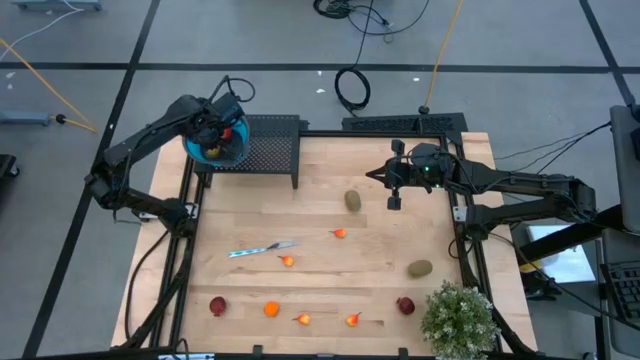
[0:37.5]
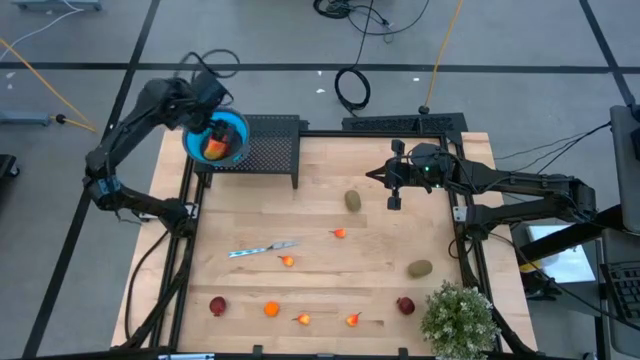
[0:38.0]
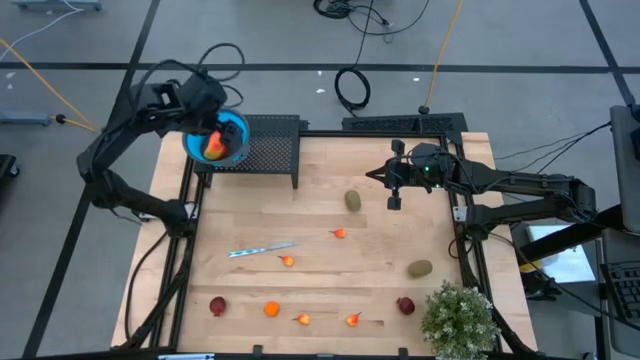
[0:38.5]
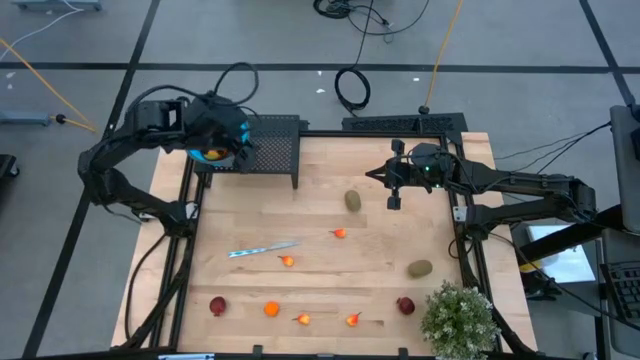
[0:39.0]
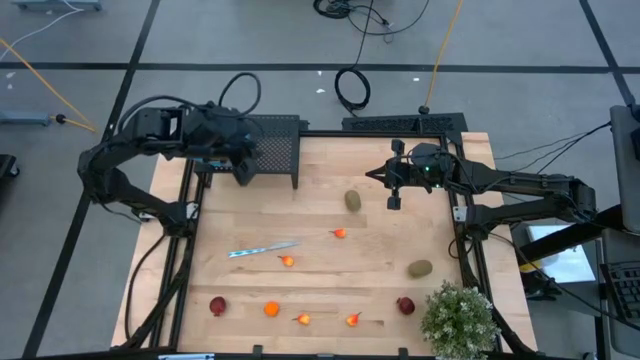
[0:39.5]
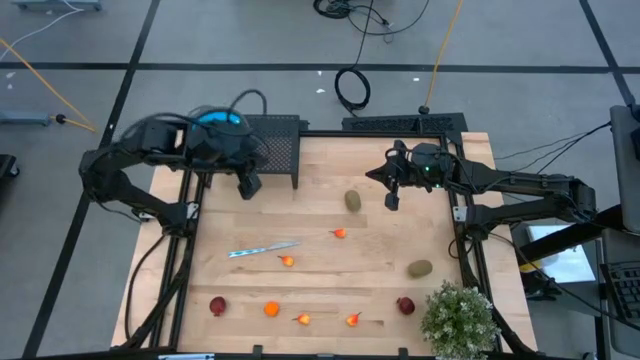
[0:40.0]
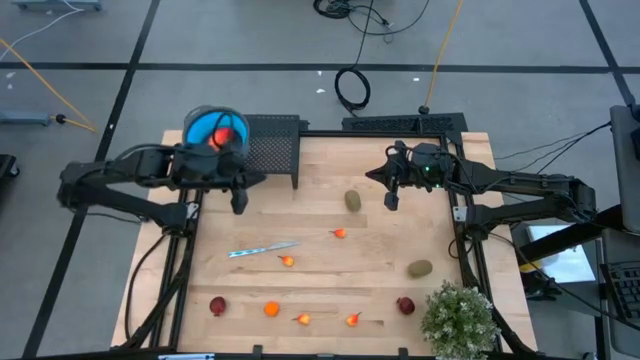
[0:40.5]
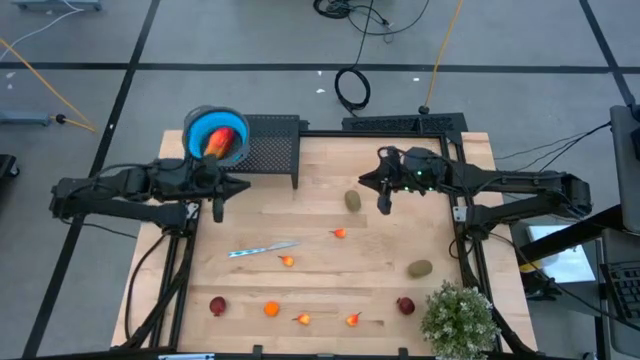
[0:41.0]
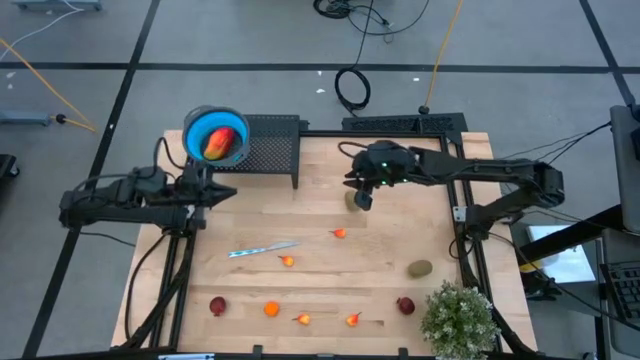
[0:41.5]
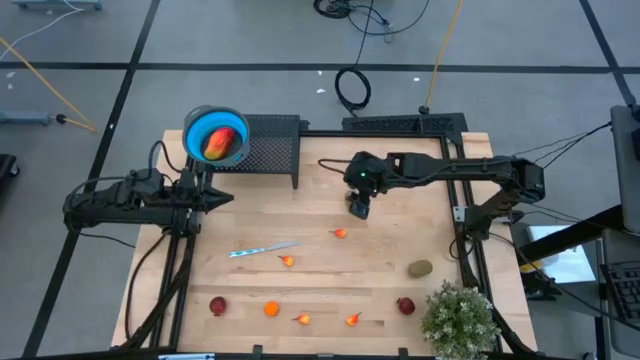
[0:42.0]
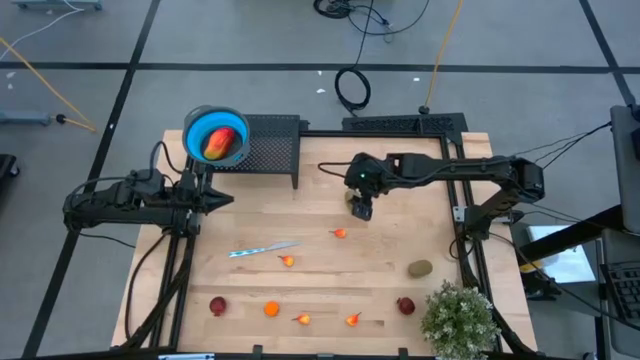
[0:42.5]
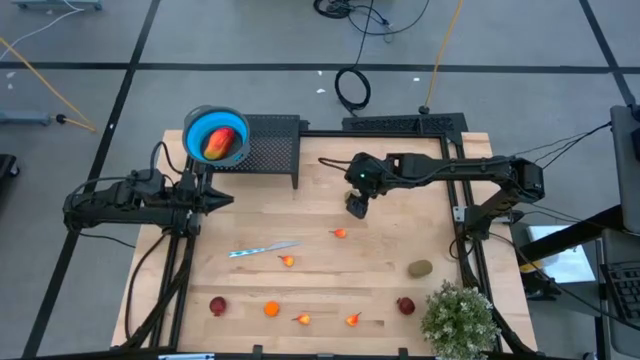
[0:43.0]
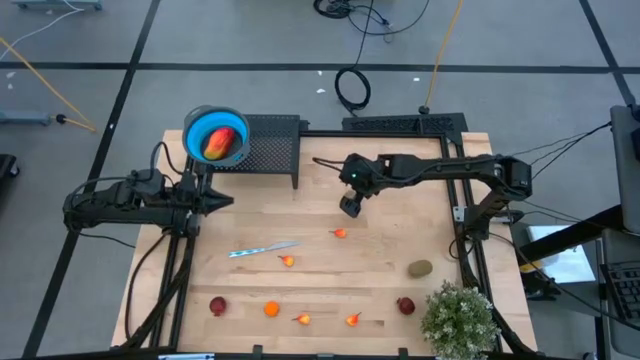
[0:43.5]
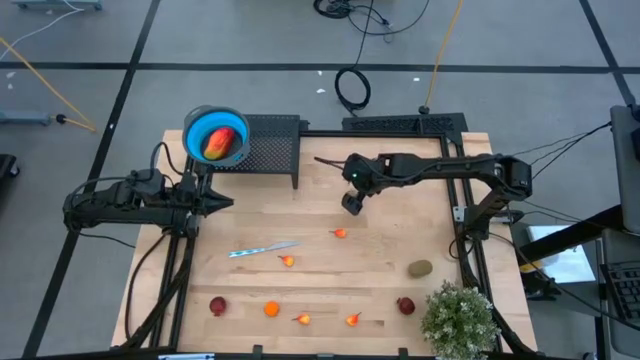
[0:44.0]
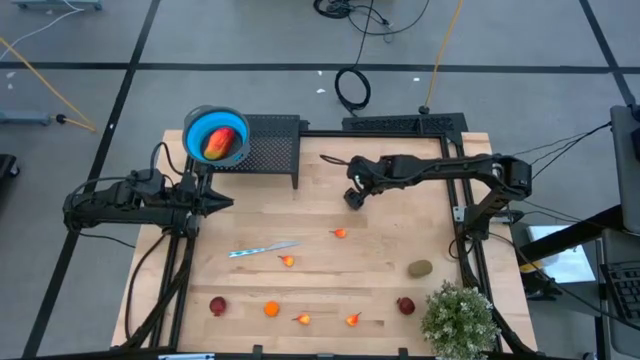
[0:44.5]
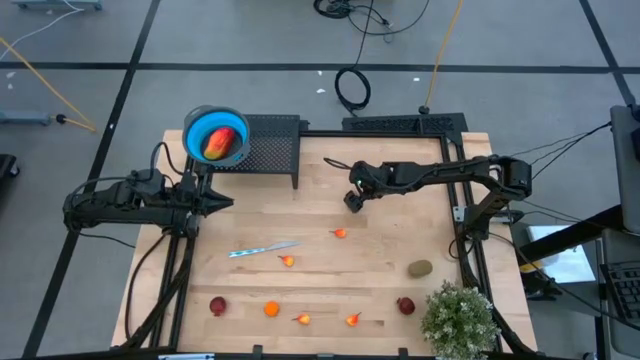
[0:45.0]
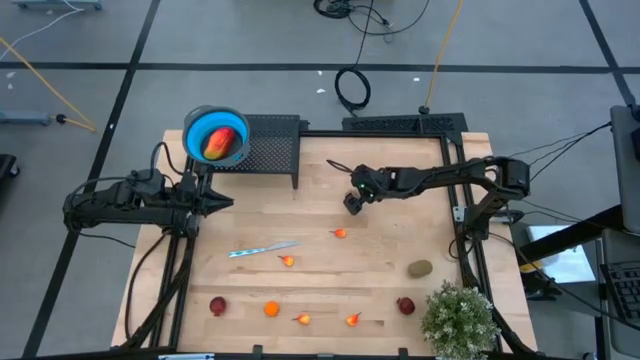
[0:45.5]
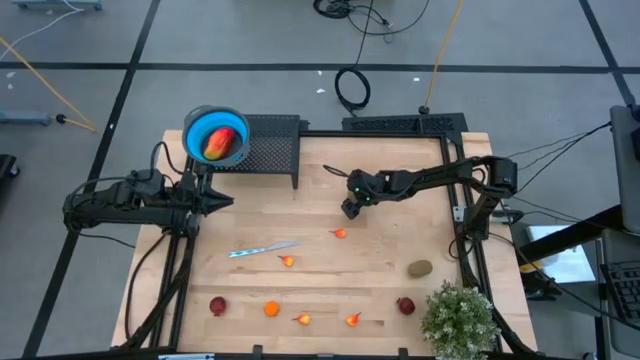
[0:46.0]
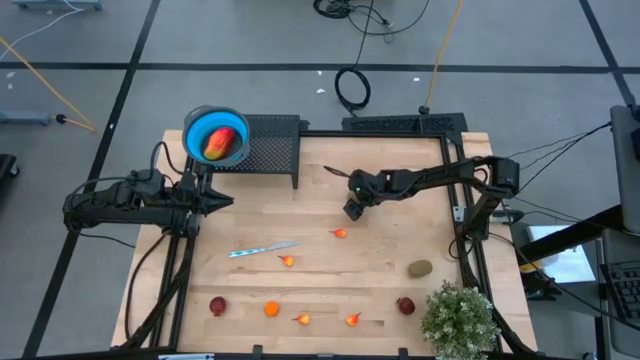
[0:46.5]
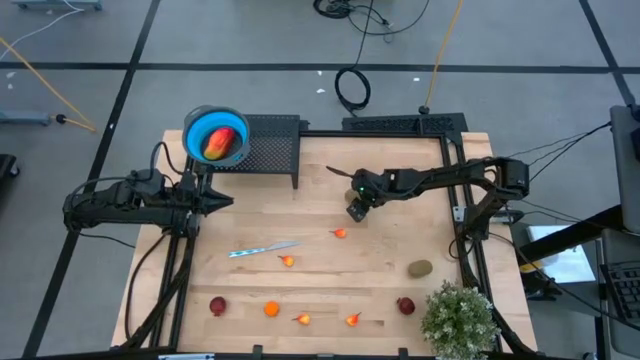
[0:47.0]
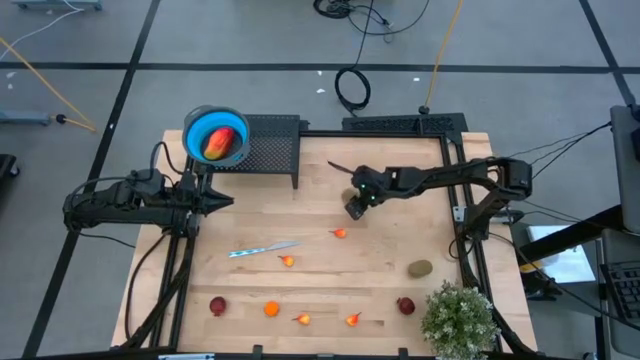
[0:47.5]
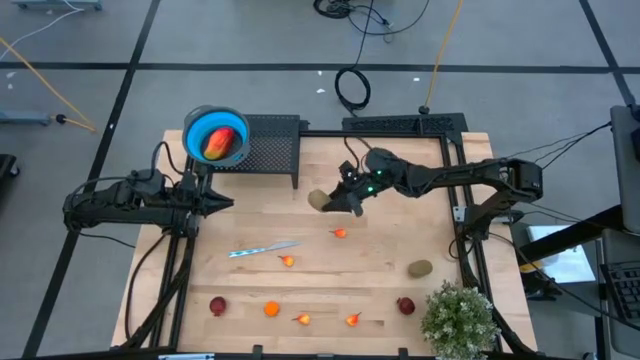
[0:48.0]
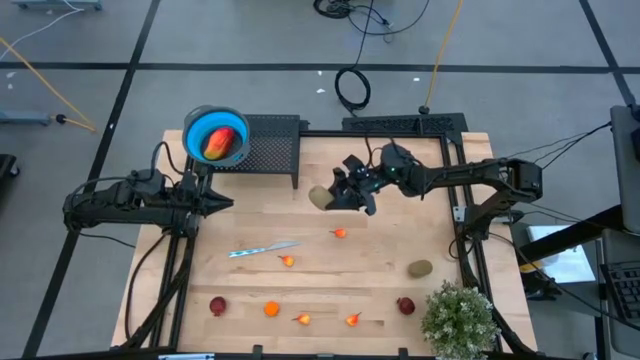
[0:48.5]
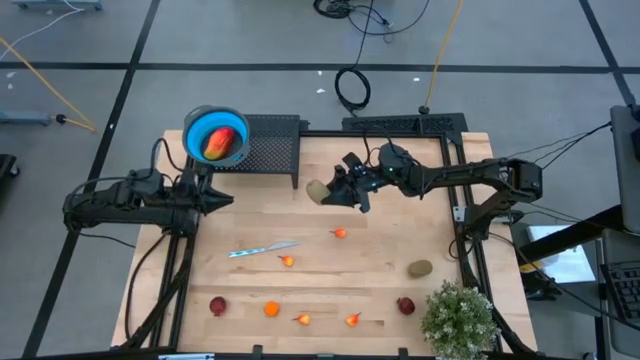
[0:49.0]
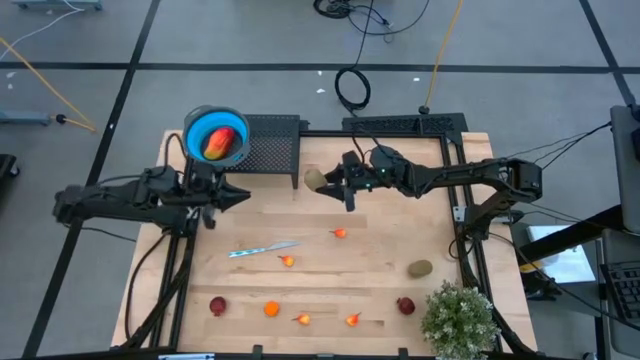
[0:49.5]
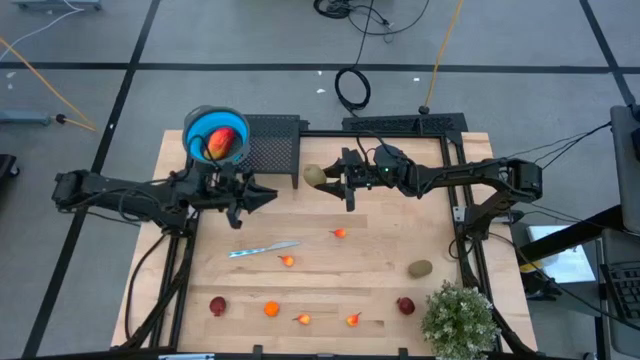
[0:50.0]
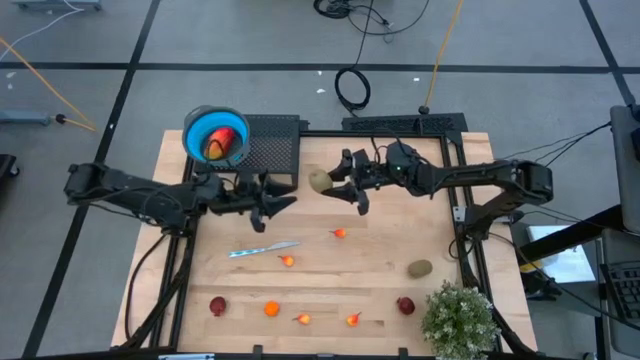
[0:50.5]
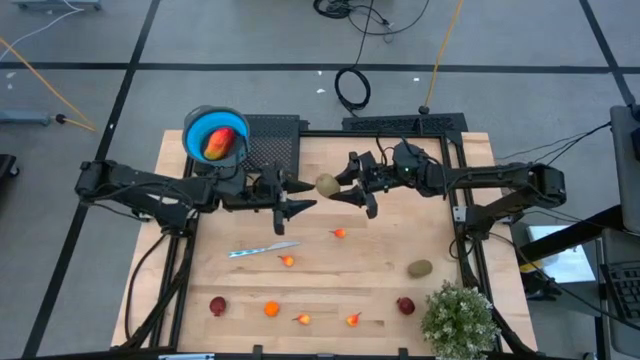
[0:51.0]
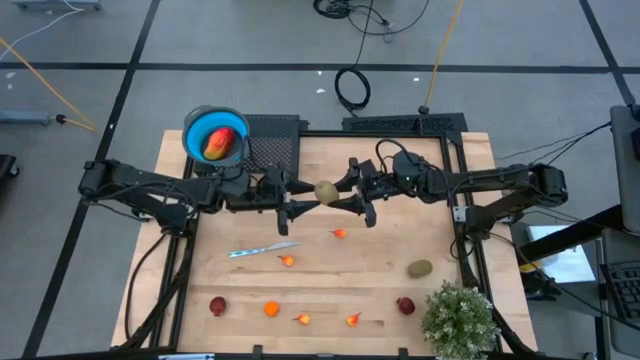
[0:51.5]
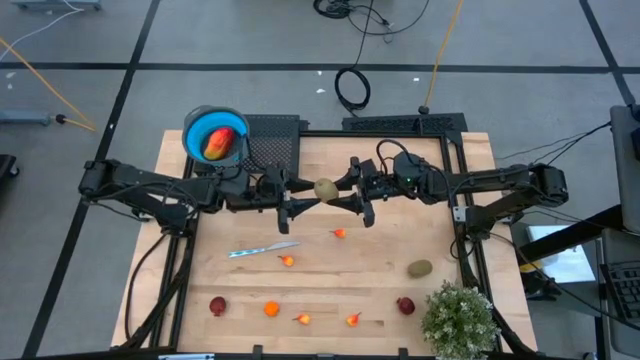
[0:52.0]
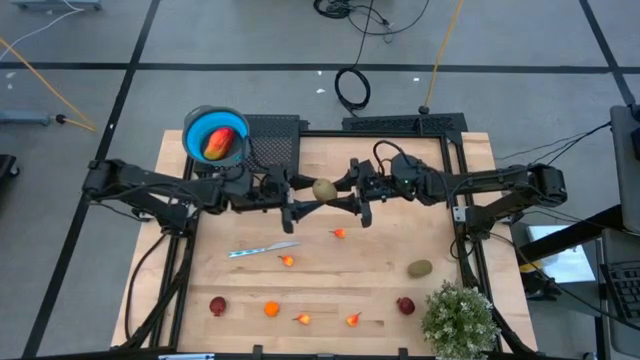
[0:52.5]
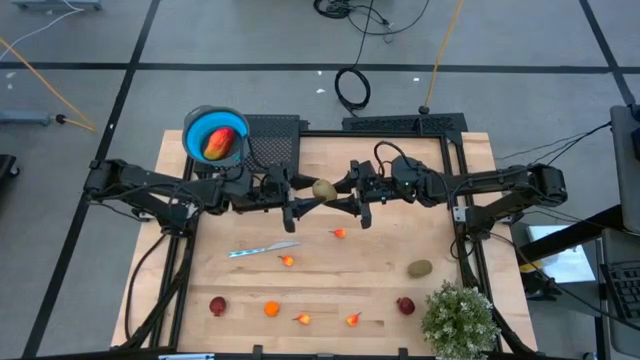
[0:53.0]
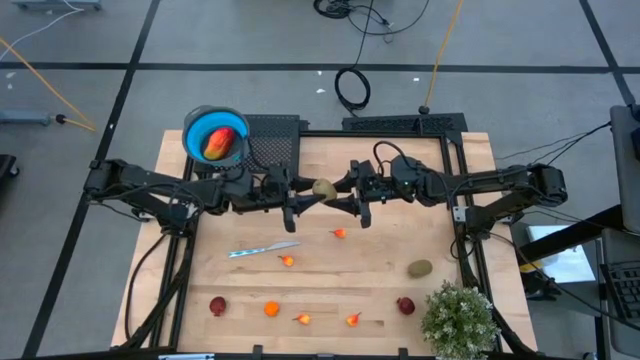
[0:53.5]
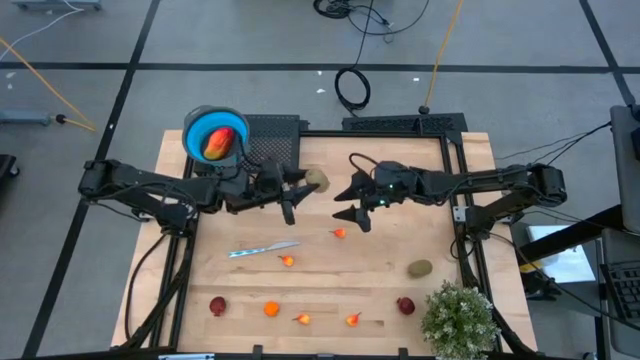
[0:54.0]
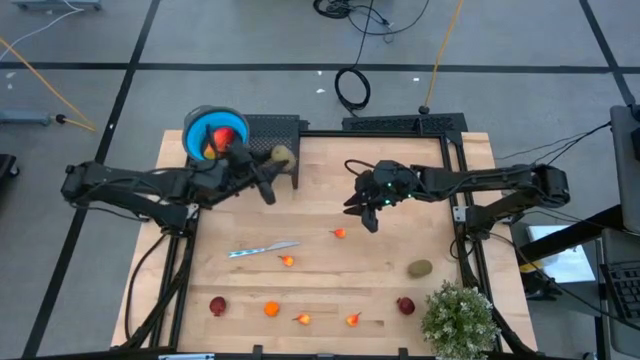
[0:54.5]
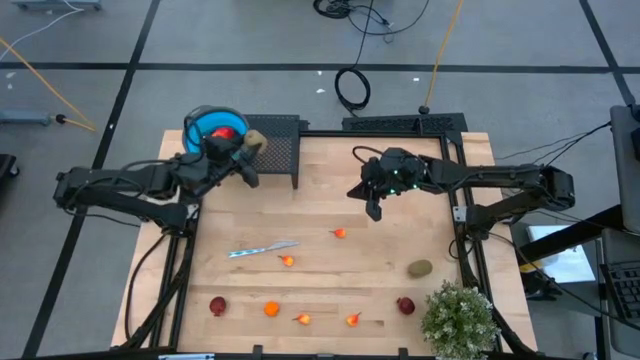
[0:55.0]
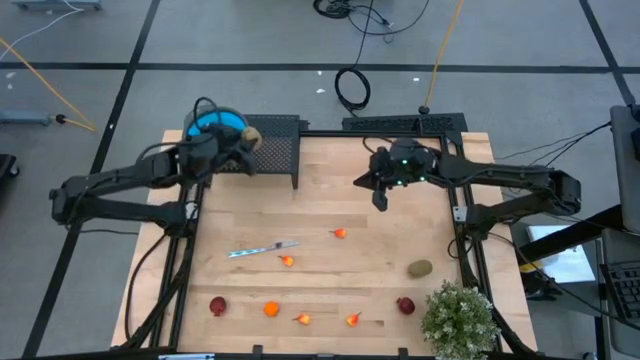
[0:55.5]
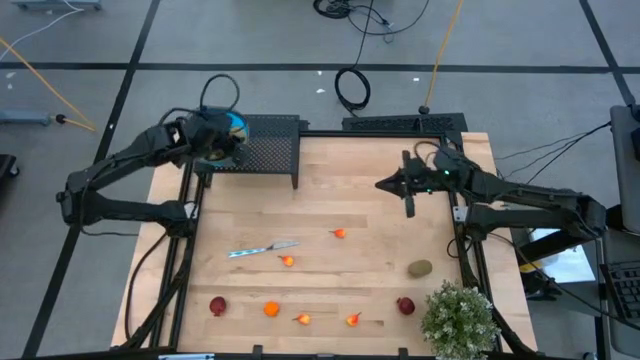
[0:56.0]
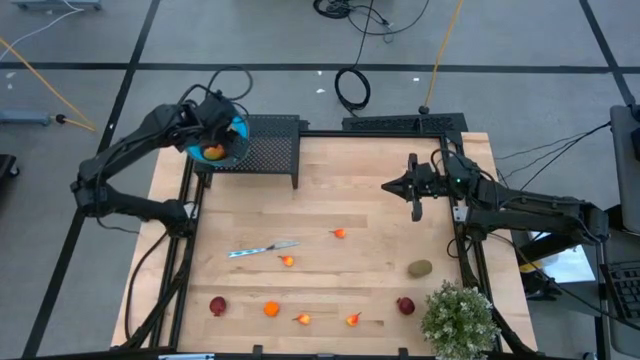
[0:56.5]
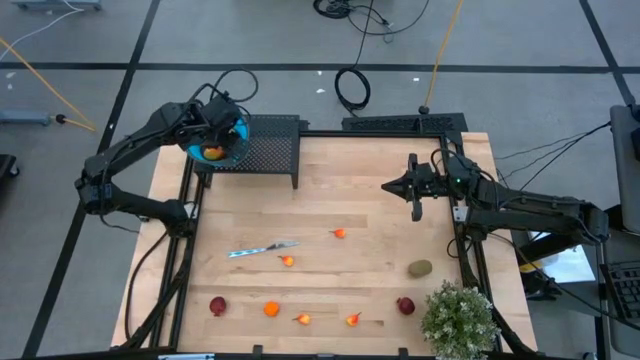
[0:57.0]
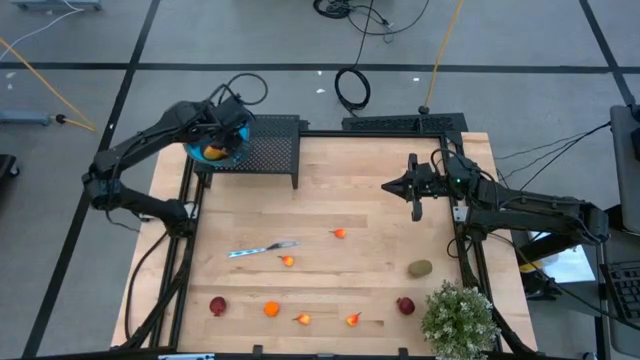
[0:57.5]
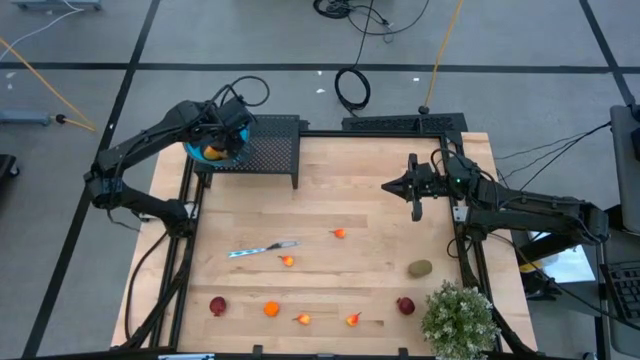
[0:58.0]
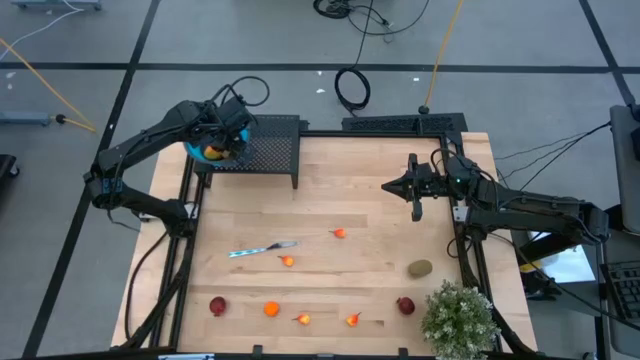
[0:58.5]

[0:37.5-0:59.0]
Task: Pick & Place Fruit
Put the kiwi into the blue strainer bowl on the shelf
